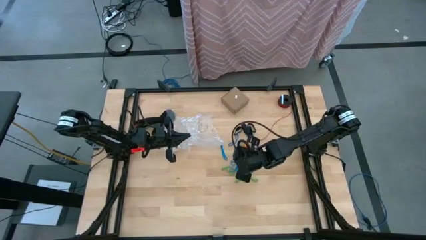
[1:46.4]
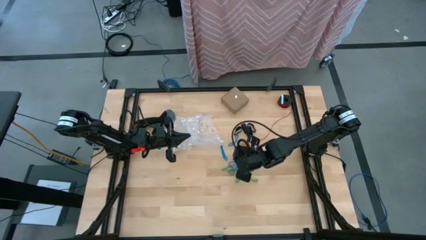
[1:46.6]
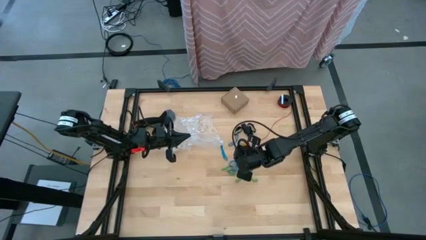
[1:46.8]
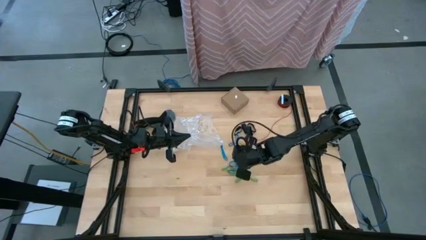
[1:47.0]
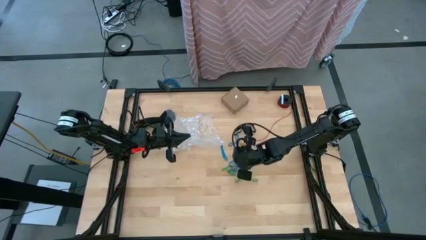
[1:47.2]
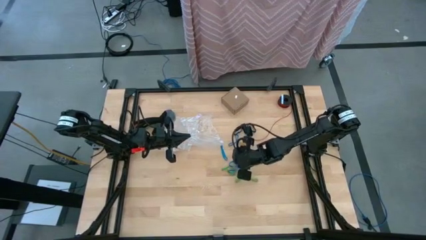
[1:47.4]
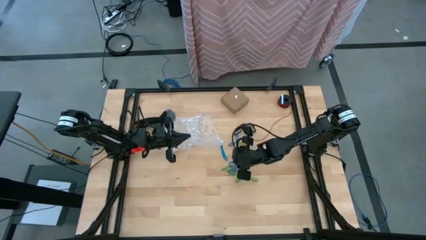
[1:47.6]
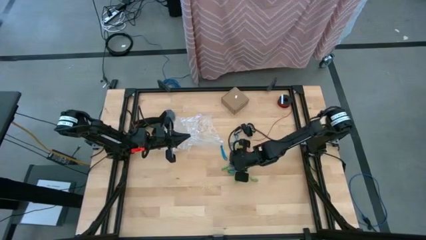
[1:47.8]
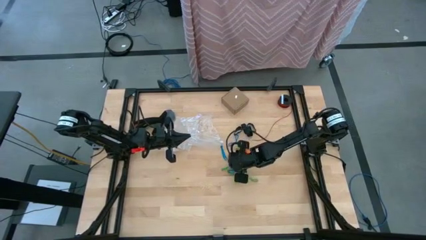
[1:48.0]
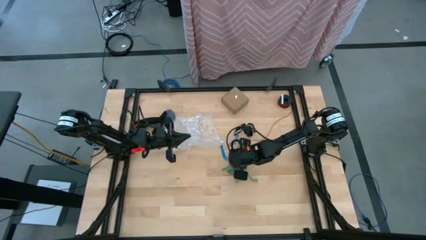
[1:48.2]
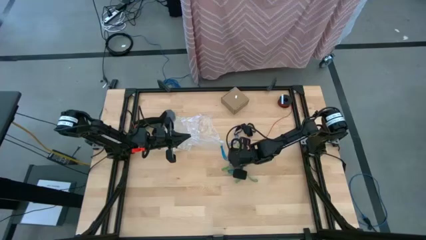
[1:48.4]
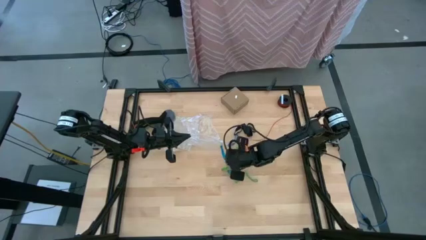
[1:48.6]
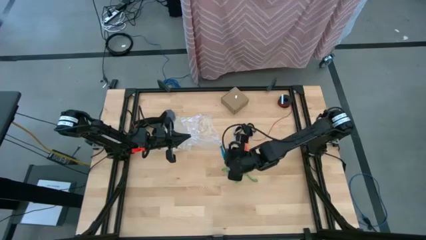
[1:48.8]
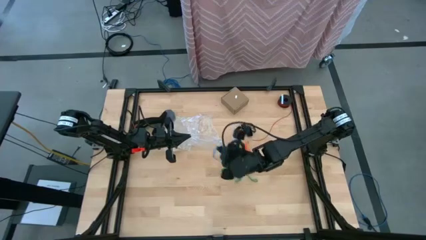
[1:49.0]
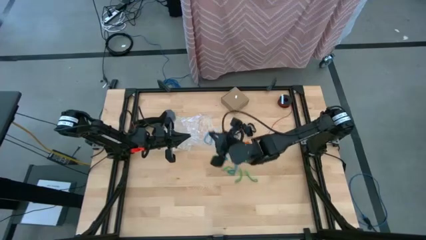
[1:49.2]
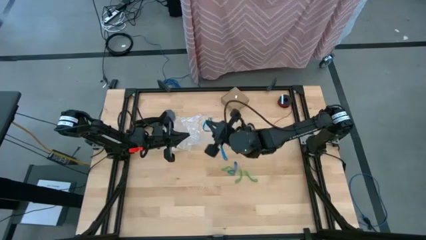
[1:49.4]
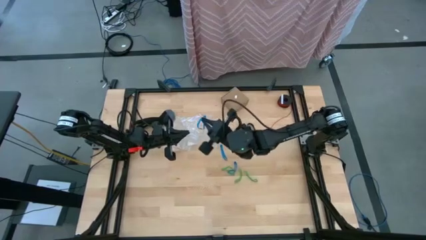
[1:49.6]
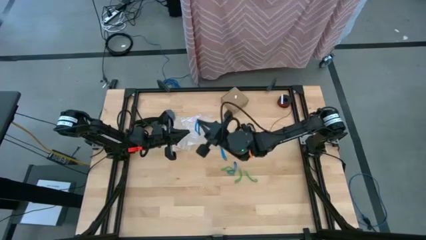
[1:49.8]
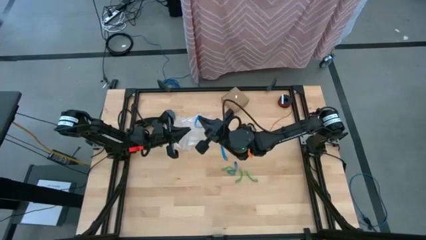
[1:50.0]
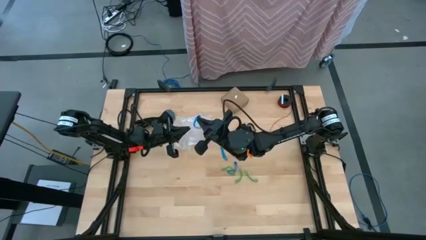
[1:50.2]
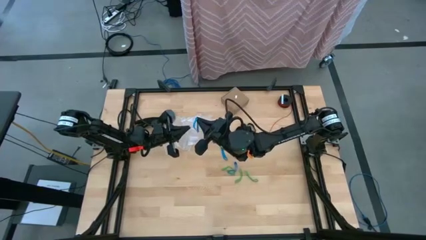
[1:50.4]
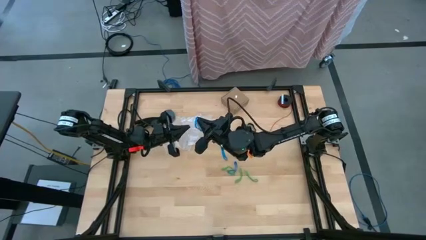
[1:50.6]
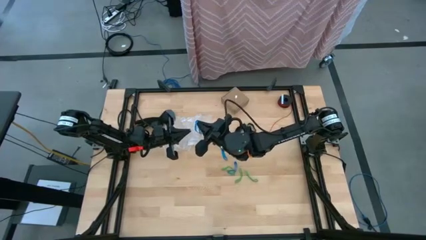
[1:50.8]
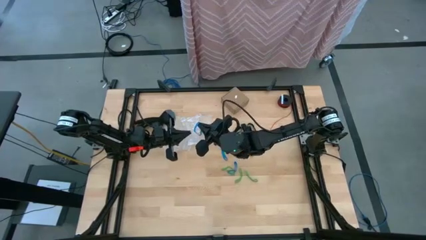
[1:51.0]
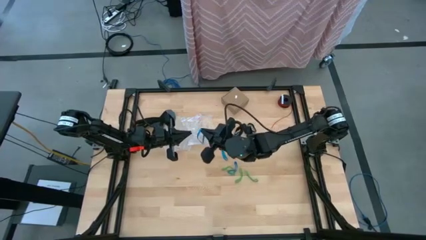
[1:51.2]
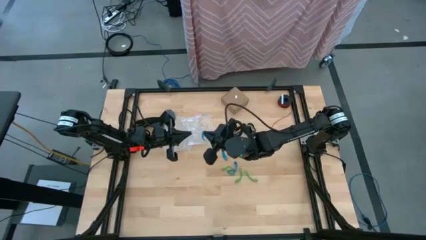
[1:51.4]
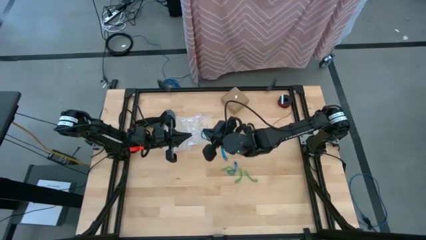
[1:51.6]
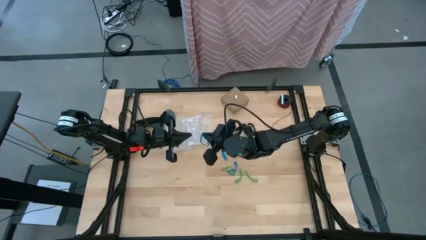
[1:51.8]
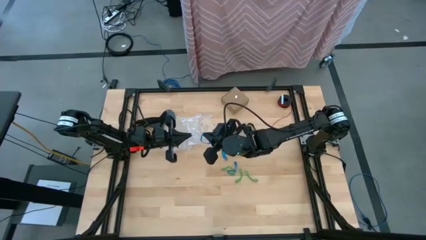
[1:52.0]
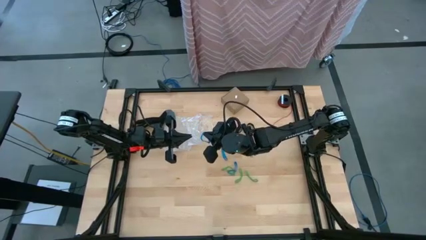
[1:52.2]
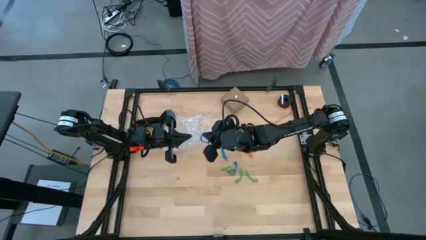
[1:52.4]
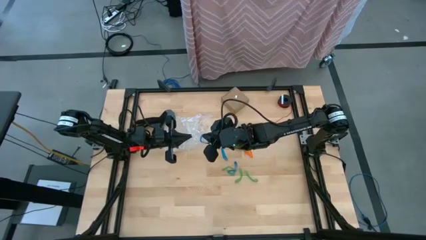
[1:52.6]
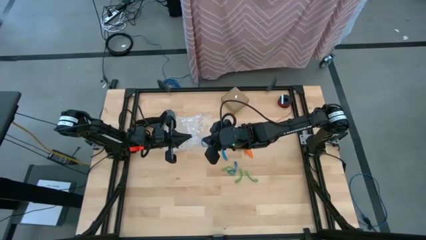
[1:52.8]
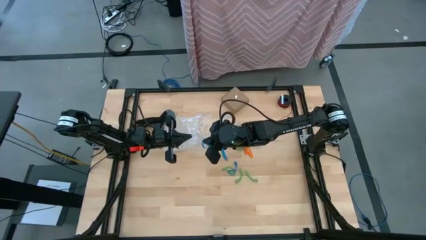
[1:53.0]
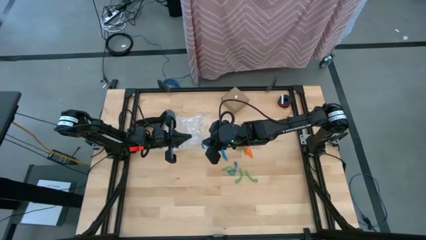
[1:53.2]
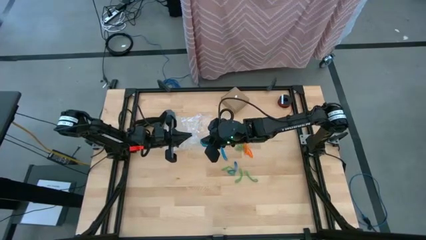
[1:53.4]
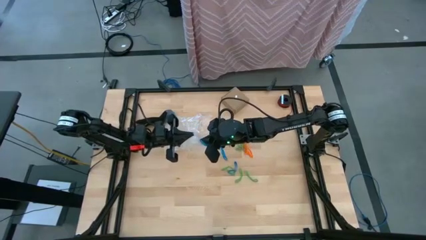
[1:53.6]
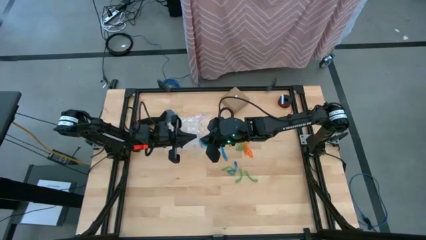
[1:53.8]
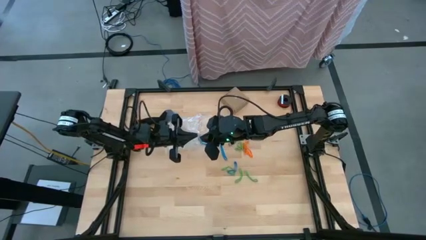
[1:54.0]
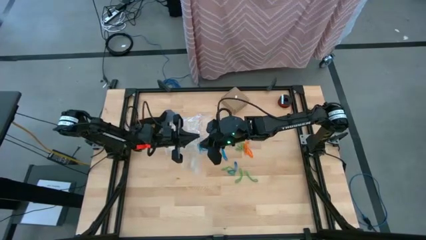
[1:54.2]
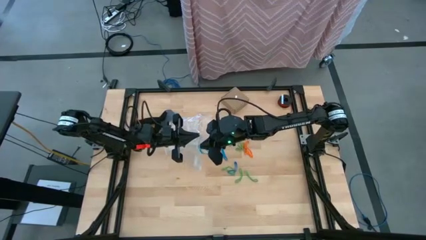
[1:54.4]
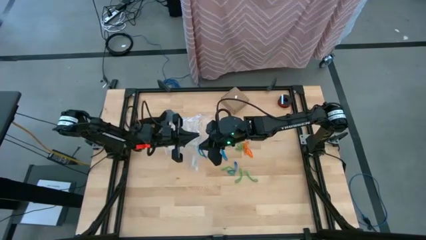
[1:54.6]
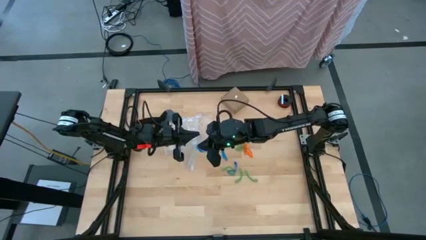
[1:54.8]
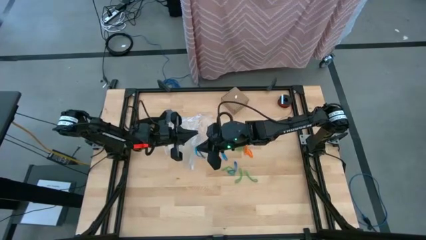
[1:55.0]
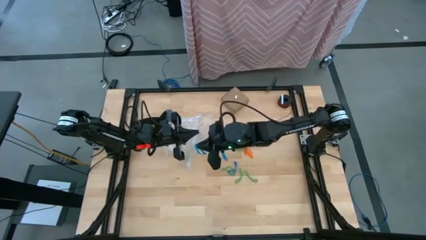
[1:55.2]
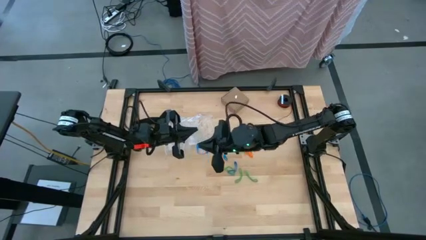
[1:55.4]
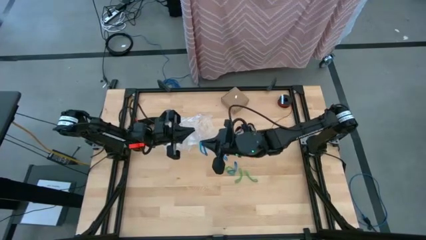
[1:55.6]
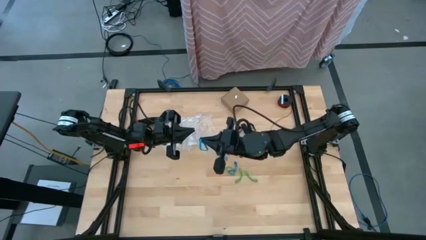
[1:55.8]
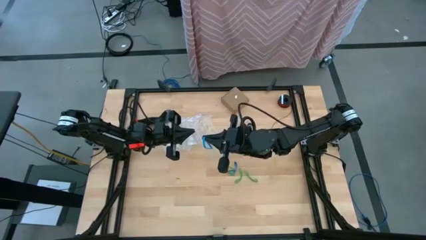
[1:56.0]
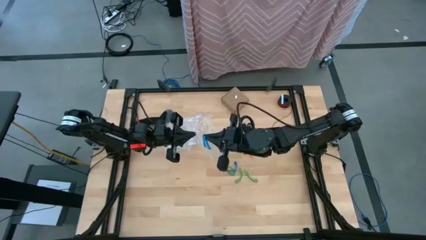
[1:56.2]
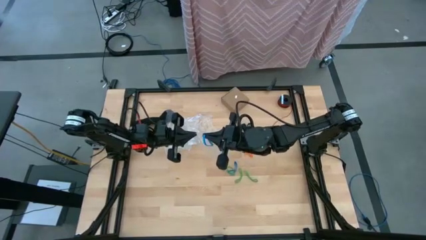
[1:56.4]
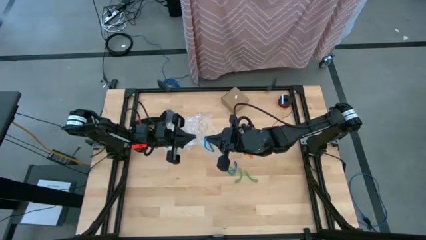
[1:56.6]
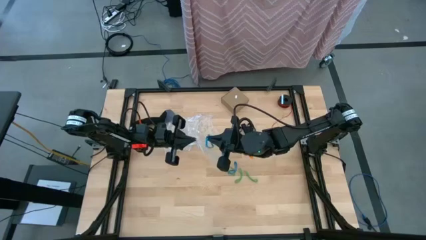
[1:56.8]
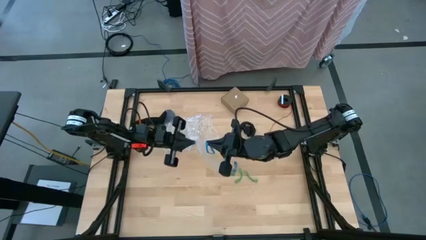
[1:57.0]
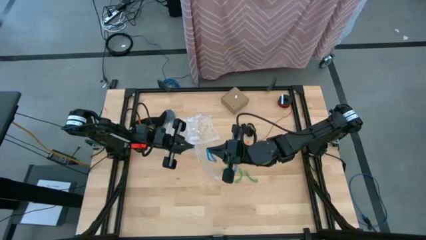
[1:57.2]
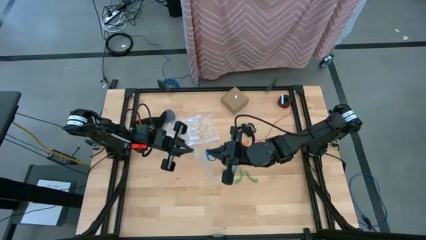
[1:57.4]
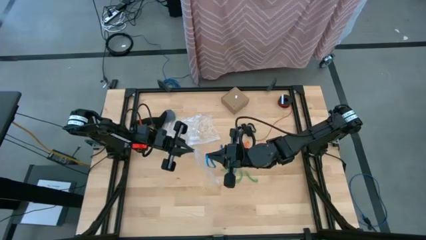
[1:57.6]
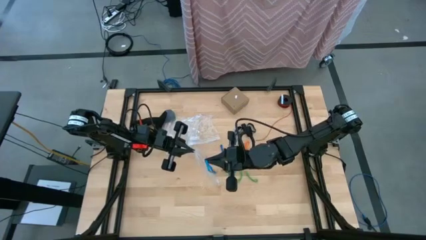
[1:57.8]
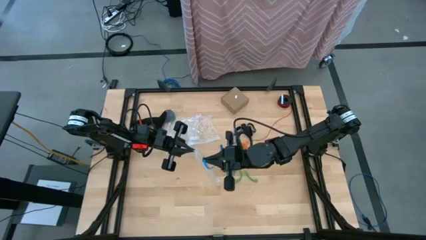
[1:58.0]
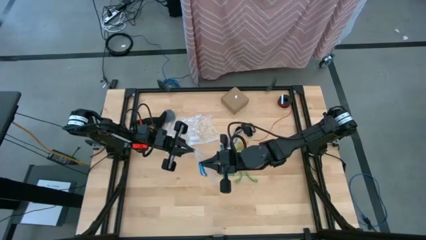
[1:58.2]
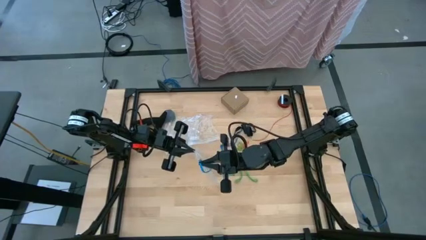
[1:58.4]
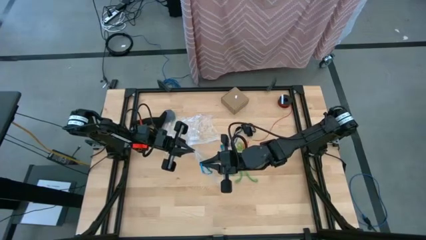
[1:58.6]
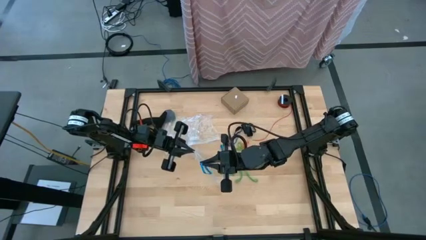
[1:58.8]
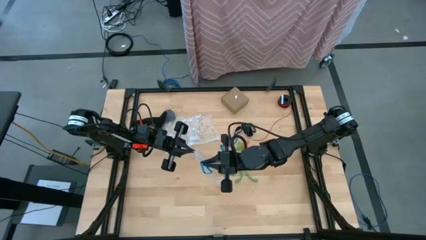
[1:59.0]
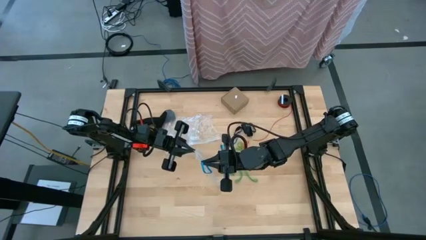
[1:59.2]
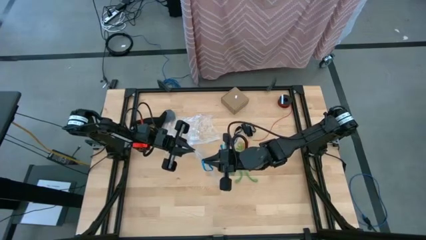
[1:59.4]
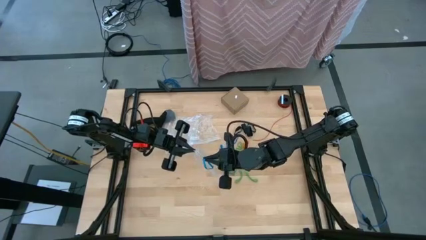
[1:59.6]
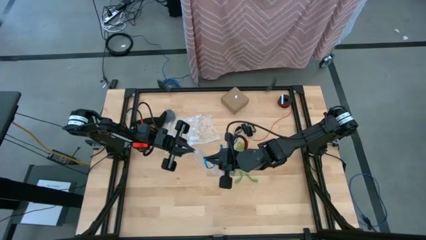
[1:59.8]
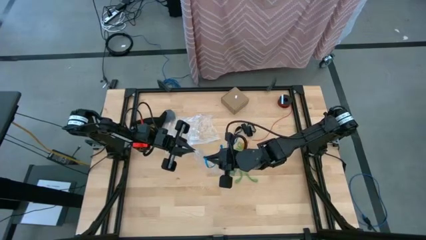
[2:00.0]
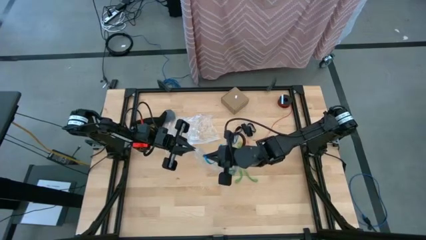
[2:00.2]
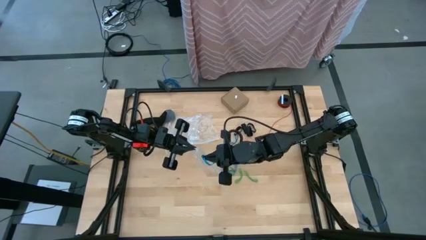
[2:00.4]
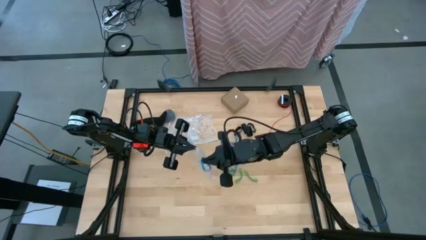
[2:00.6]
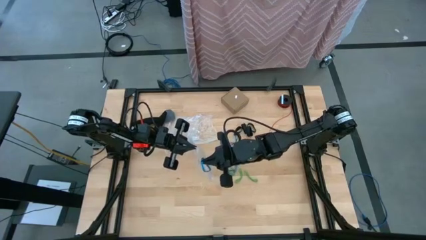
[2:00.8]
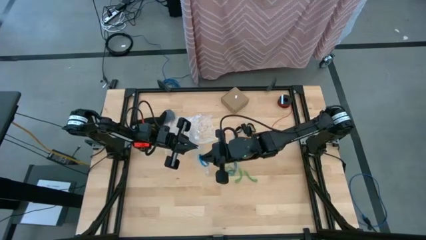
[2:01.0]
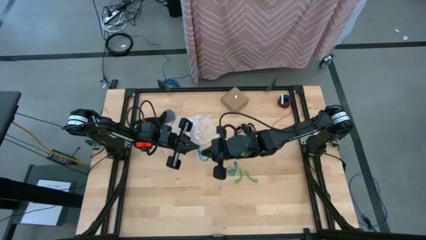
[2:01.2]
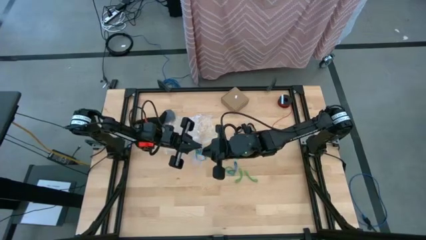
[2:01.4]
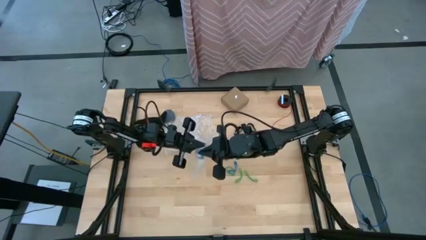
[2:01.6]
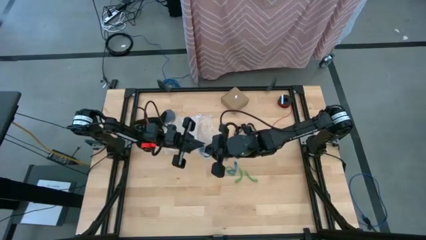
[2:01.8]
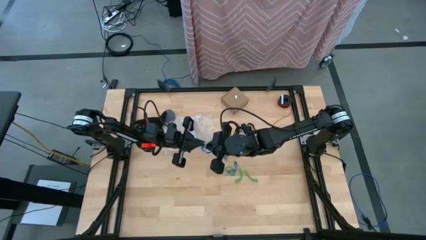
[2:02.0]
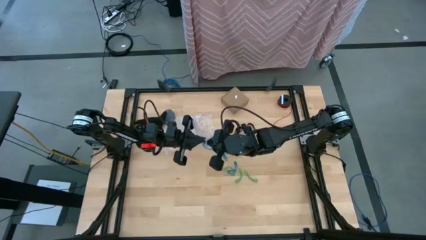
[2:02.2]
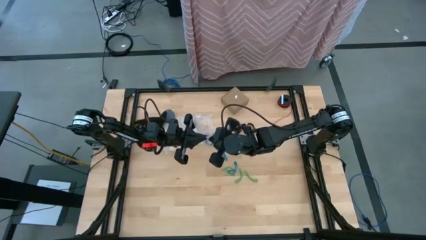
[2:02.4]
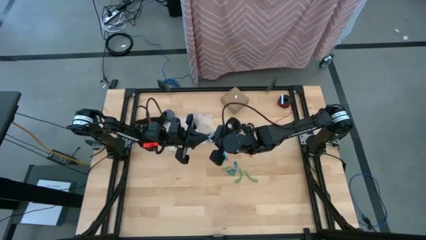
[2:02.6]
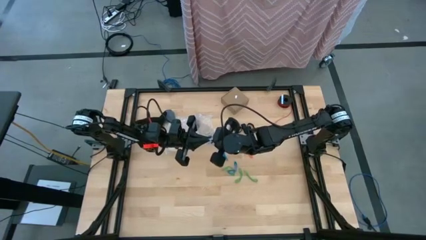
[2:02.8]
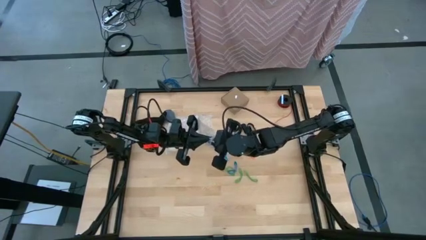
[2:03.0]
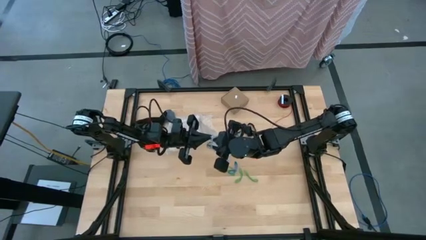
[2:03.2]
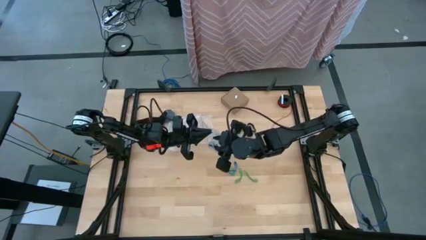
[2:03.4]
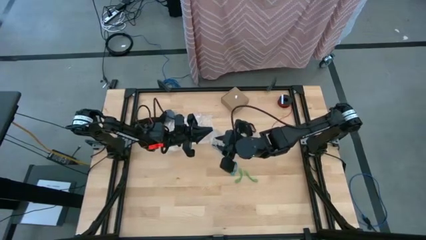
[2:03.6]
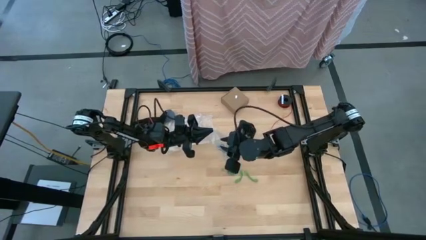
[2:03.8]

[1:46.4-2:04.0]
Task: Sort rubber bands
Put the blue rubber band into the transparent zip bag
